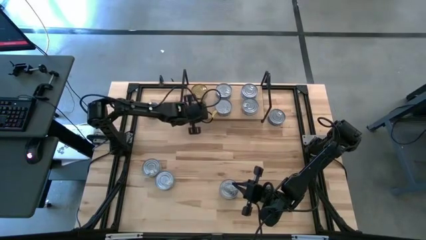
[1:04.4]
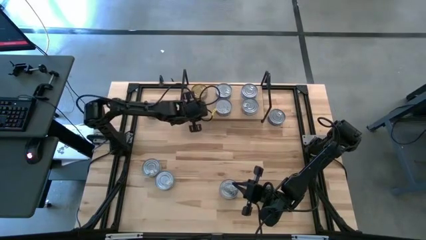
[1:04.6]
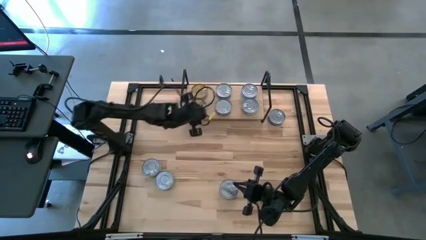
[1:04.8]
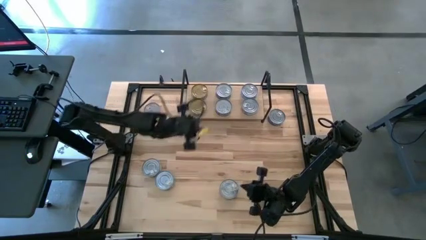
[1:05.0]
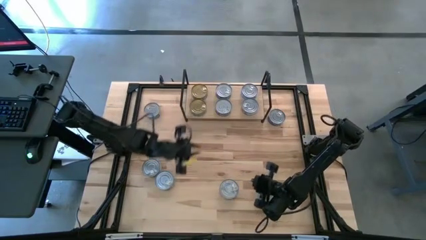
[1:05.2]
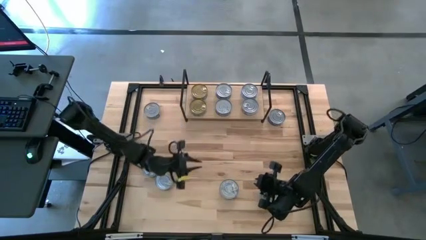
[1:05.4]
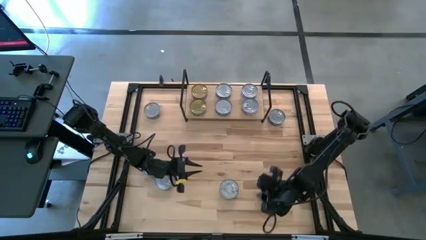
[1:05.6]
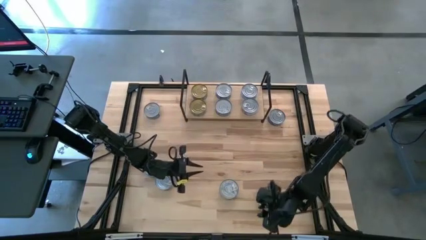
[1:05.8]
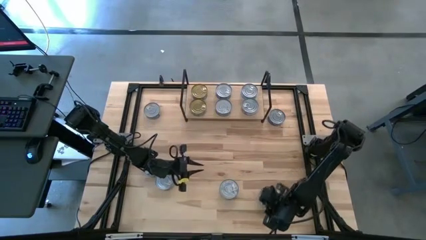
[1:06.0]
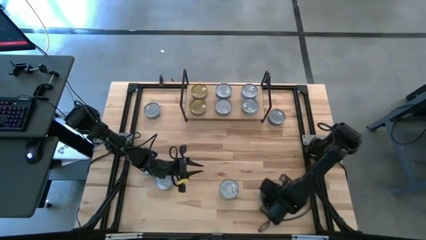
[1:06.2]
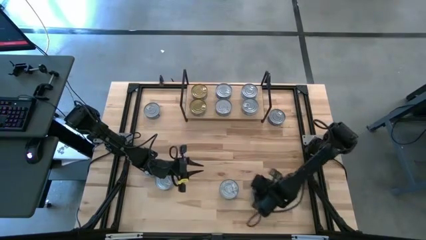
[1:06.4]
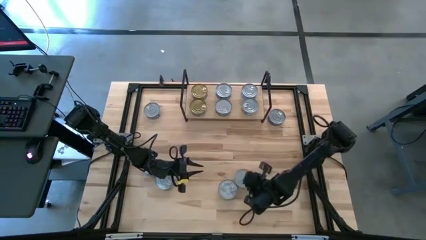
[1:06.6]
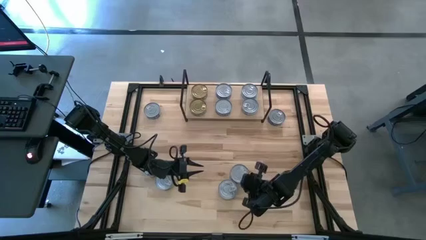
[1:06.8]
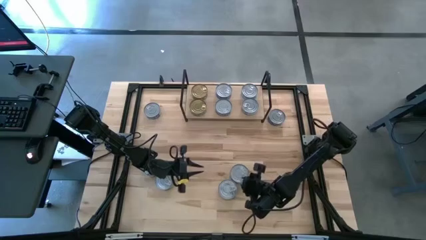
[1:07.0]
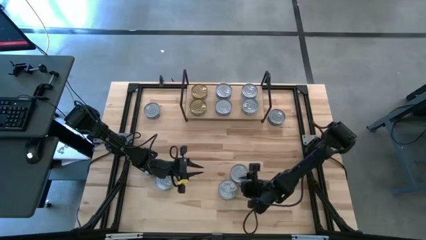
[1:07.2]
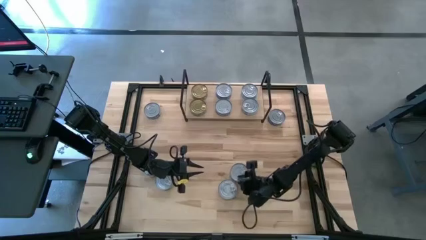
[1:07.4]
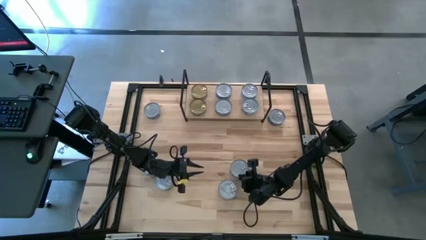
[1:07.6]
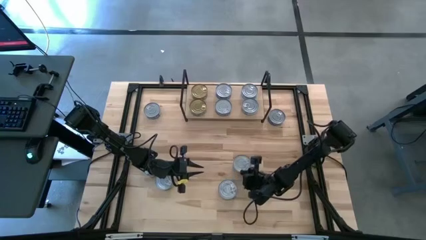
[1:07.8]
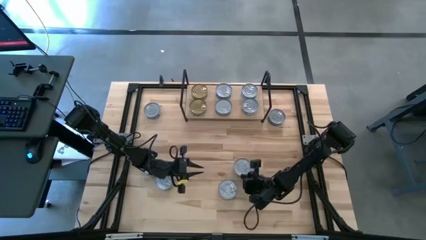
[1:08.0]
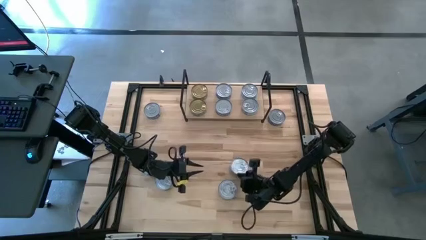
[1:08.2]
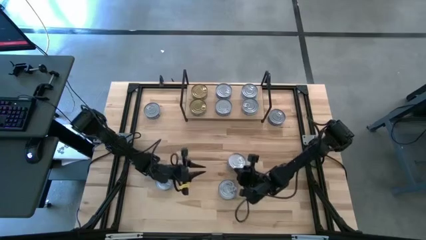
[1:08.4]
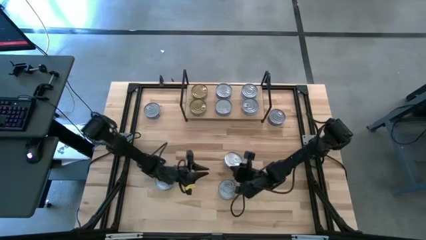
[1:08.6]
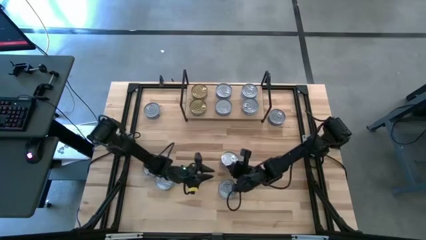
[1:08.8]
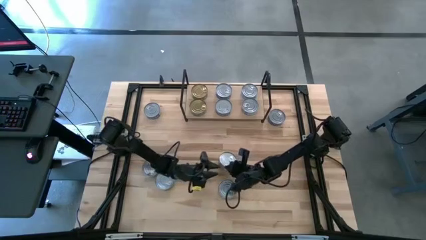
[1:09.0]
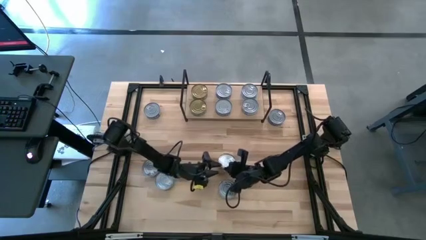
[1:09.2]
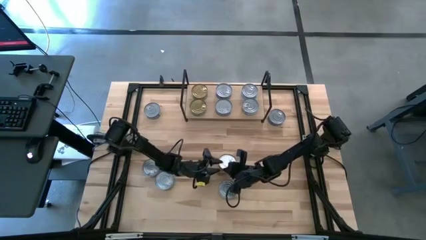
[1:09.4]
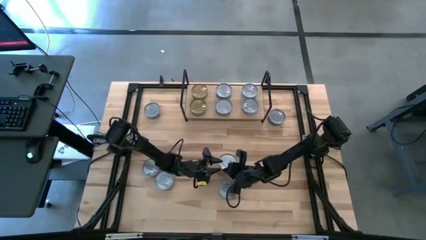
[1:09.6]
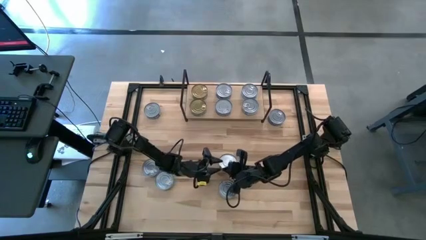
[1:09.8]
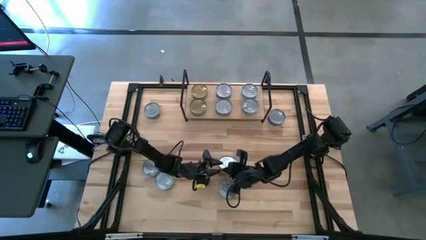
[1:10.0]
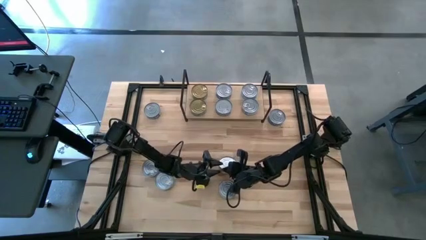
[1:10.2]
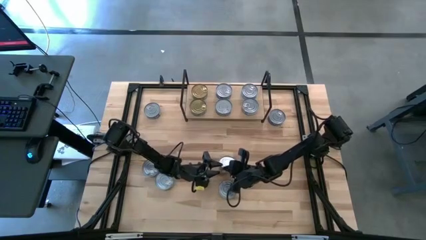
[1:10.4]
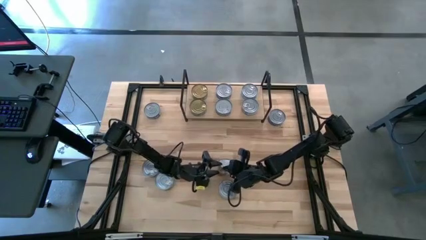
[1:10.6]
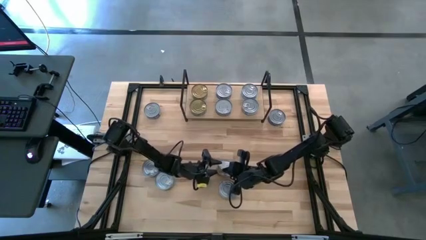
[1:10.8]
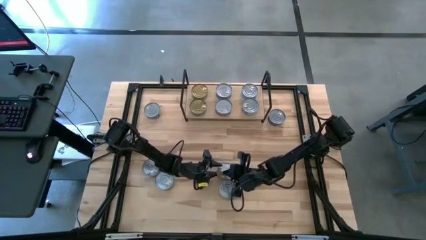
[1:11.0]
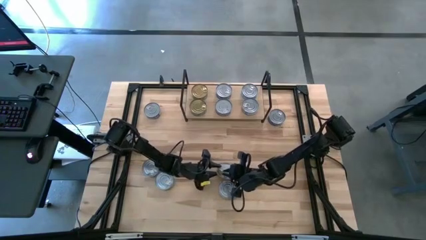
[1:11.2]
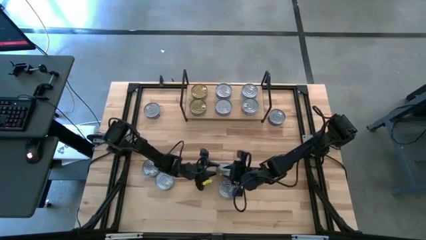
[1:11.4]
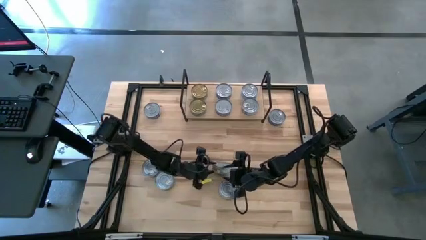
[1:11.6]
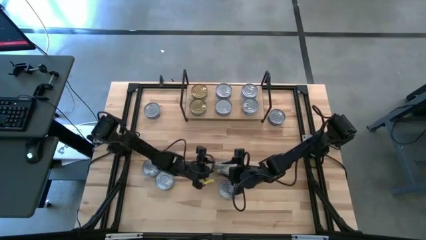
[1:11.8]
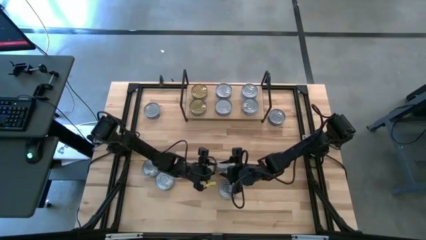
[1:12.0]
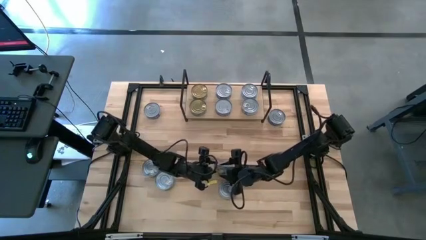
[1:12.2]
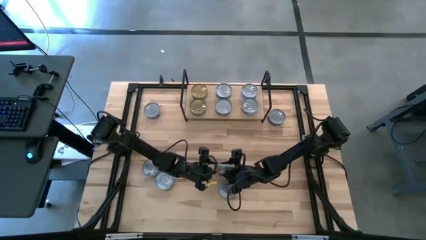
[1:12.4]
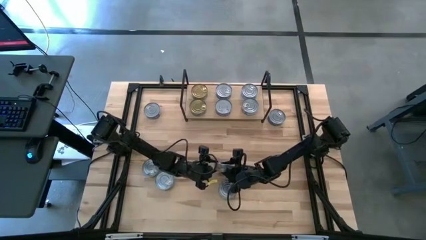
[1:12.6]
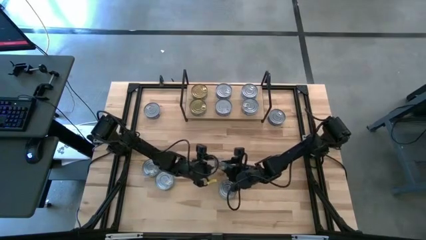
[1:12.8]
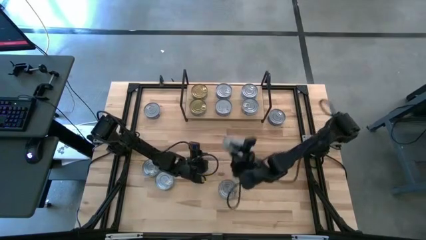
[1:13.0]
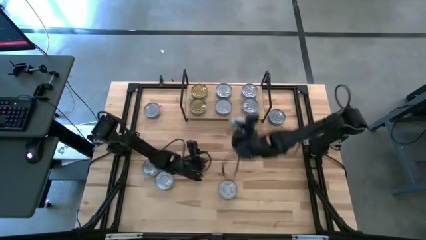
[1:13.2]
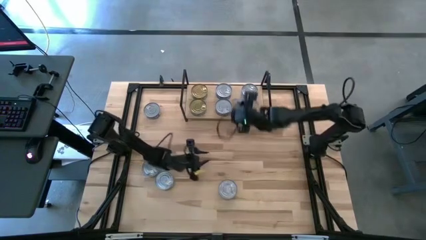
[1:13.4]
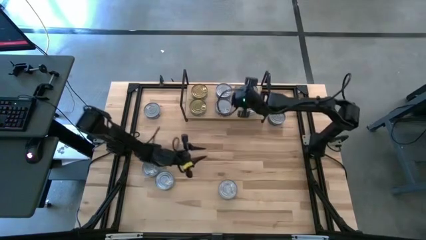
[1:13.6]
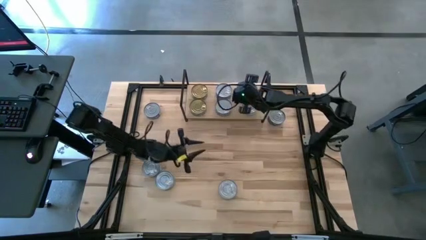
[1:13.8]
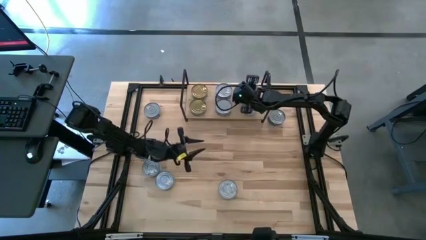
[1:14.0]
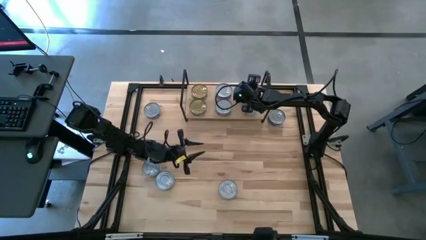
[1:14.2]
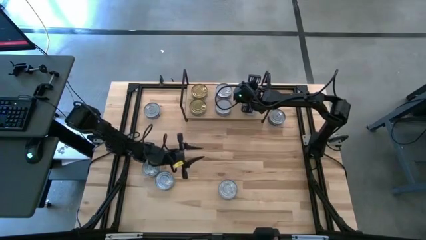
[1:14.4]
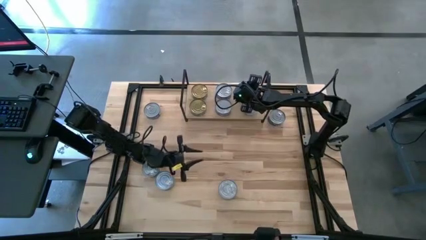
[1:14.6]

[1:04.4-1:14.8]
Task: Stack canned seafood by type on shelf
Stack the yellow-blue tuna can on top of the yellow-blue tuna can on the shelf

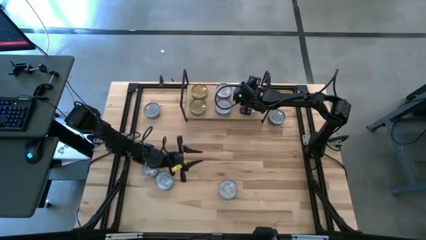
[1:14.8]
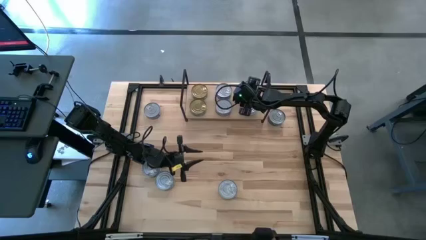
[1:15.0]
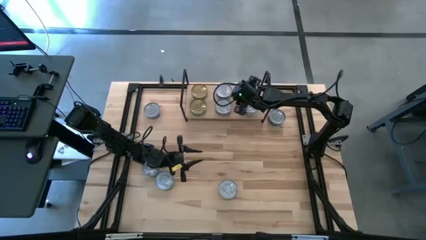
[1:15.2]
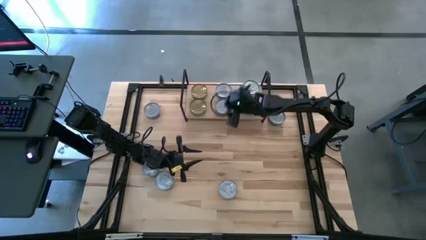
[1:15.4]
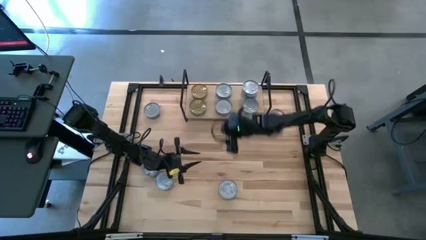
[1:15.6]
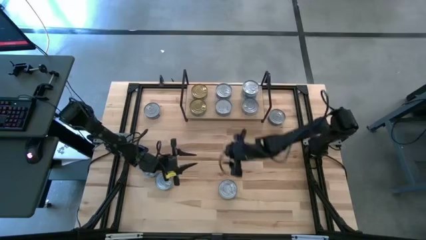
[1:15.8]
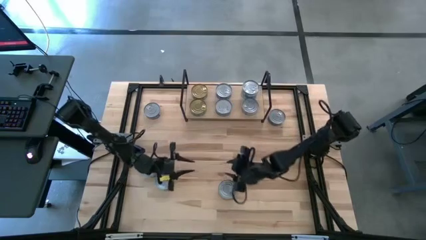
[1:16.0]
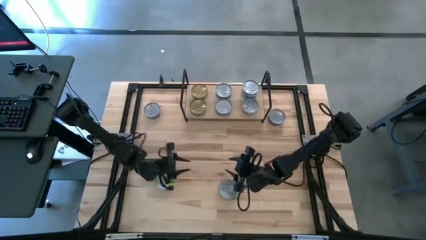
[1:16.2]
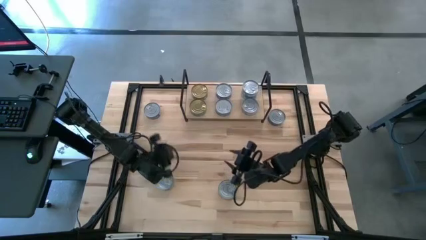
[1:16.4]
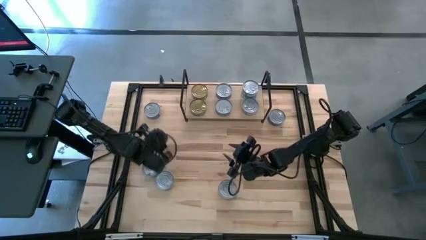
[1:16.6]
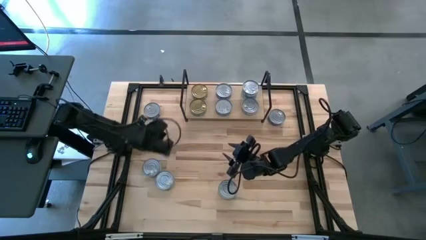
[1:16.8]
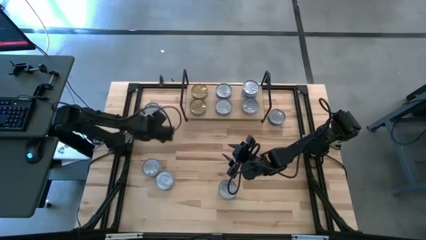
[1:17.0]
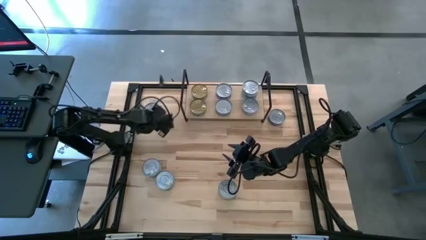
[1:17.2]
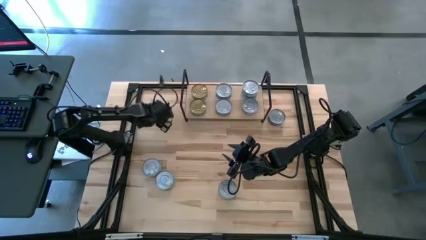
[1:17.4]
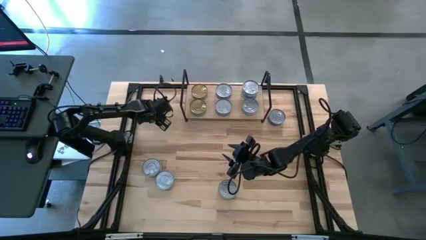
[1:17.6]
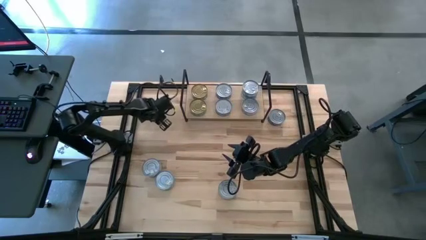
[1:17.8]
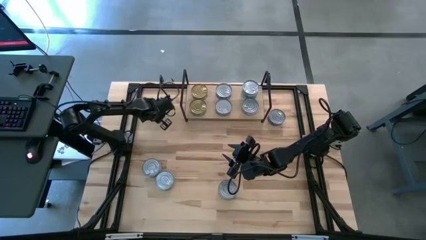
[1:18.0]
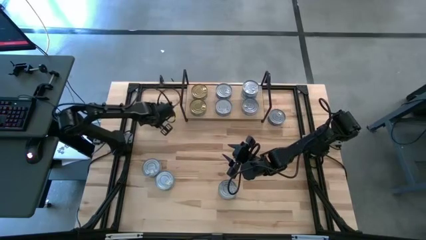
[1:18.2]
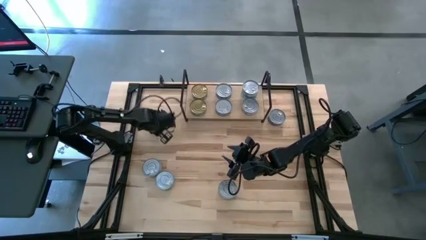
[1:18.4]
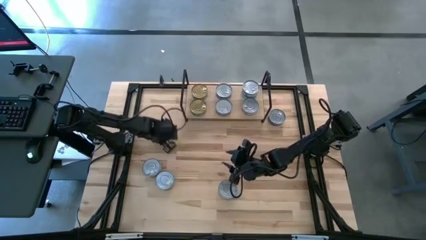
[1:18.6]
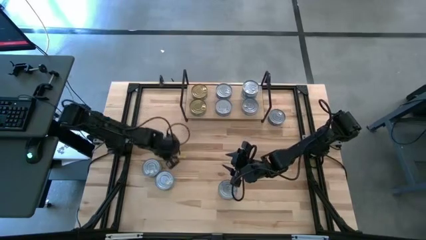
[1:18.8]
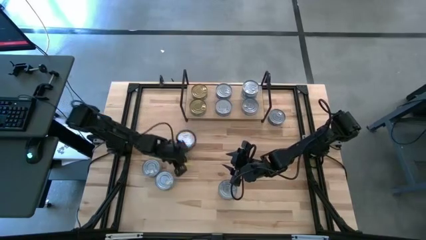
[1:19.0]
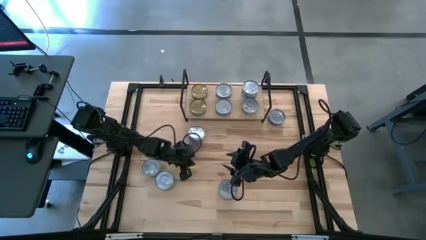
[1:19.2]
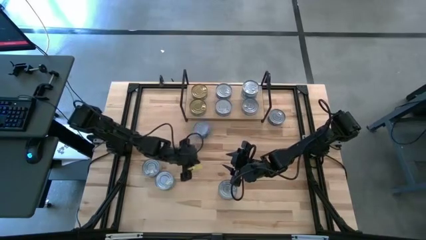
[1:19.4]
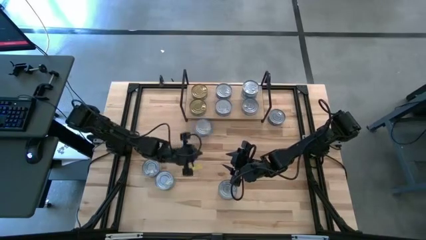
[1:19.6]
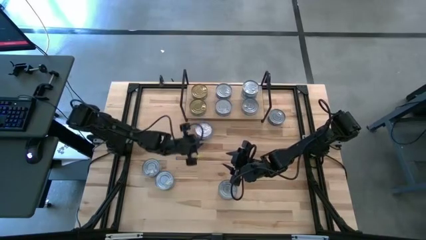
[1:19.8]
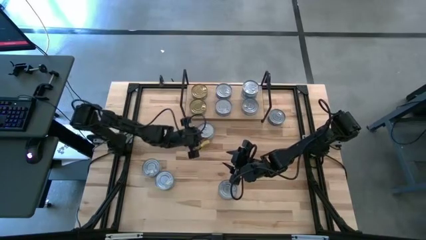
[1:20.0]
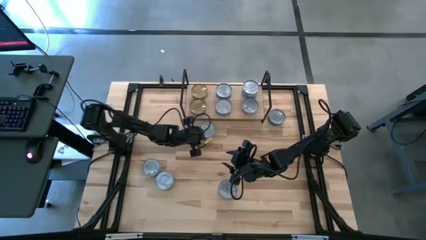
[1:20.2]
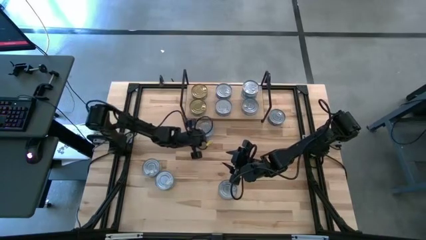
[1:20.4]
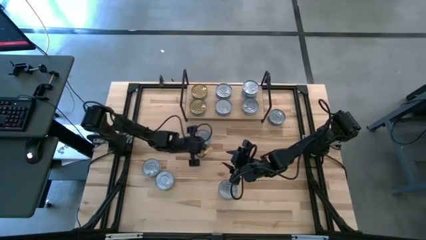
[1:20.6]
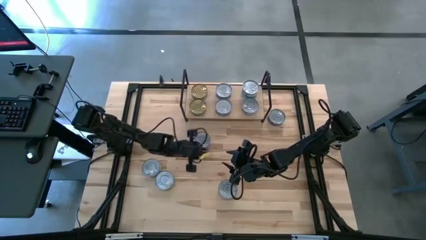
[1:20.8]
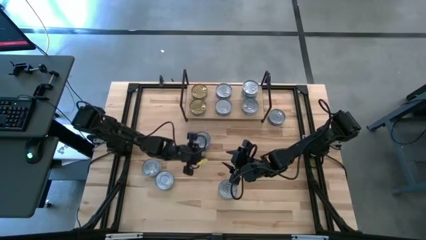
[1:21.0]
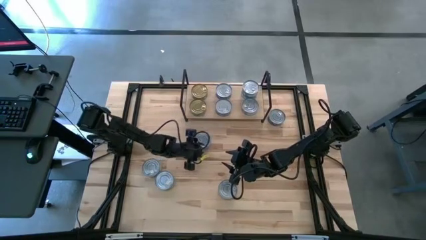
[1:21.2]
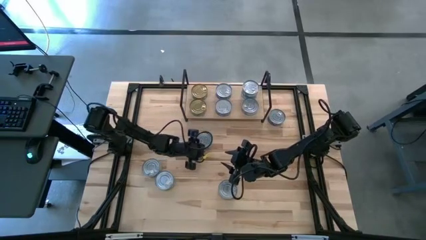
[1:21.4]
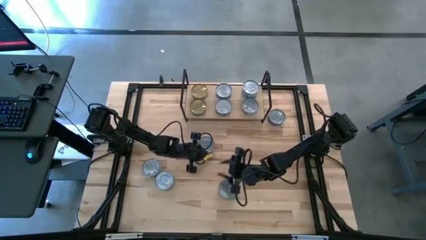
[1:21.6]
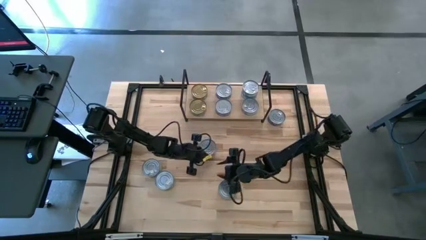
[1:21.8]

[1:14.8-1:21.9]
Stack the blue tuna can on top of the blue tuna can on the shelf
